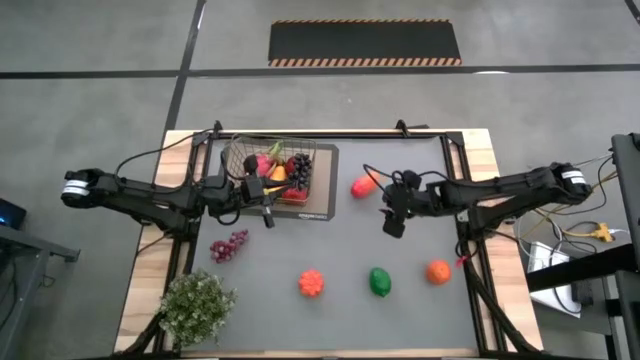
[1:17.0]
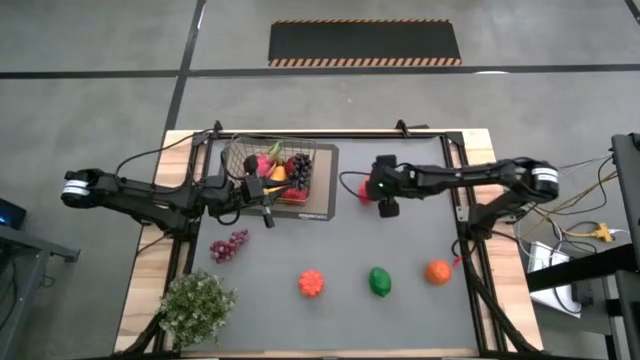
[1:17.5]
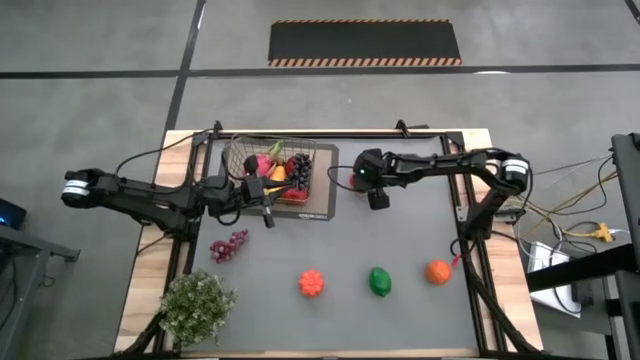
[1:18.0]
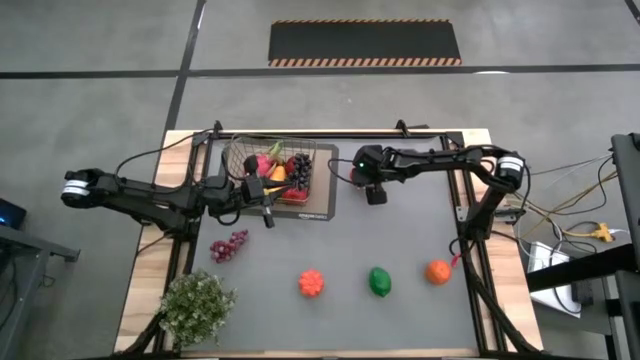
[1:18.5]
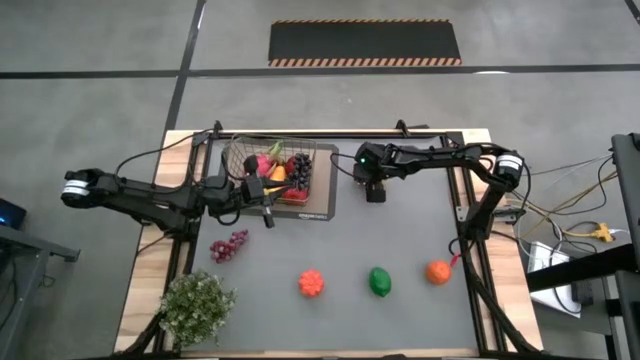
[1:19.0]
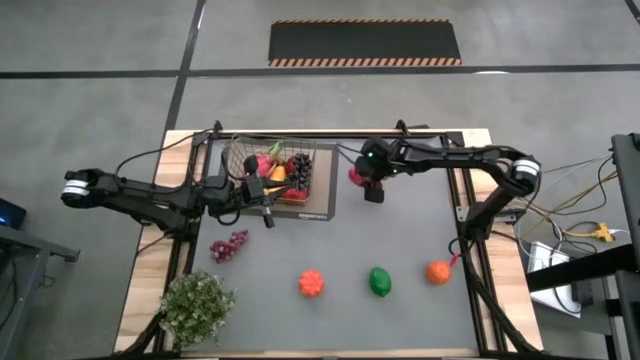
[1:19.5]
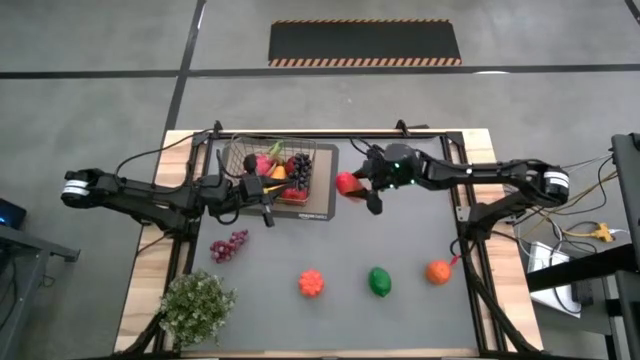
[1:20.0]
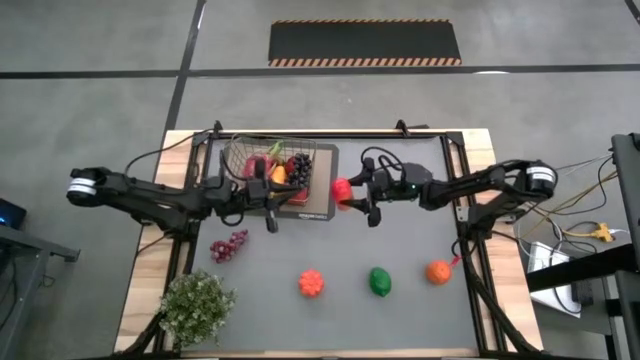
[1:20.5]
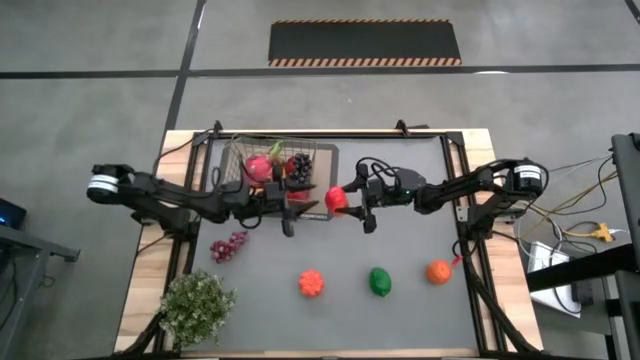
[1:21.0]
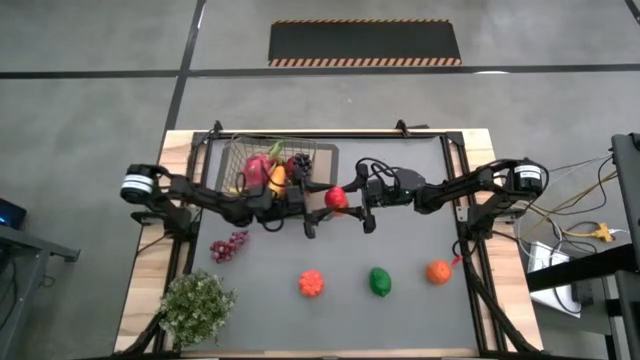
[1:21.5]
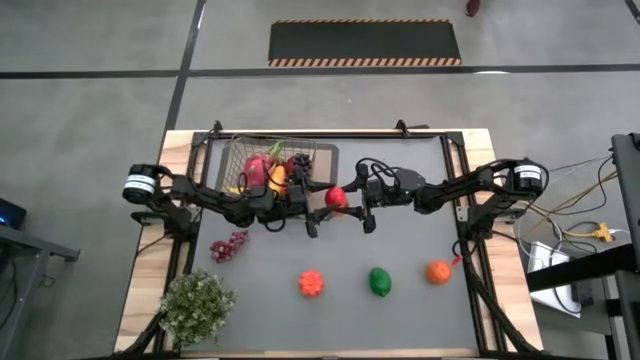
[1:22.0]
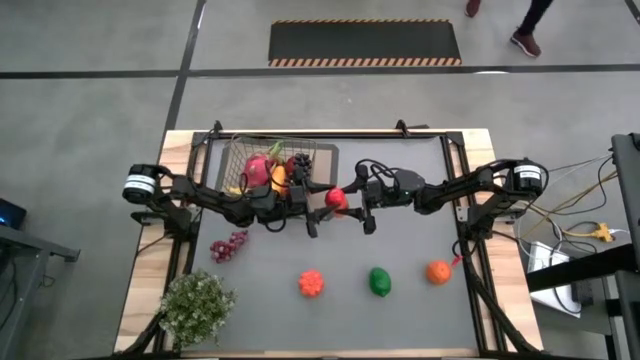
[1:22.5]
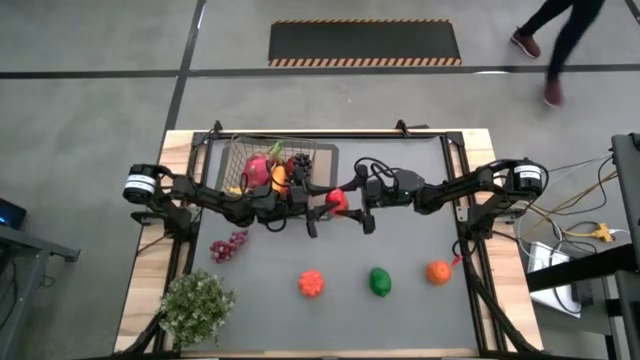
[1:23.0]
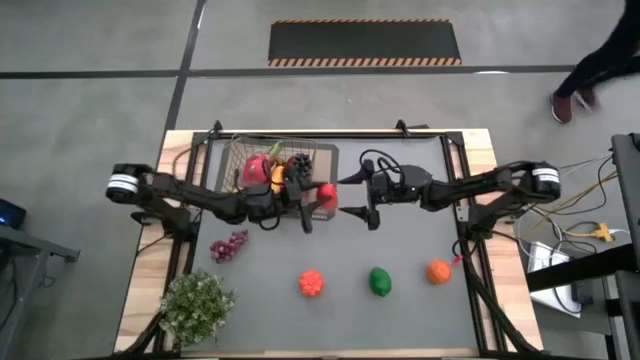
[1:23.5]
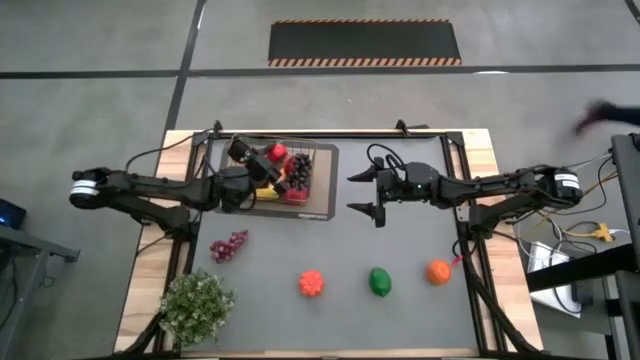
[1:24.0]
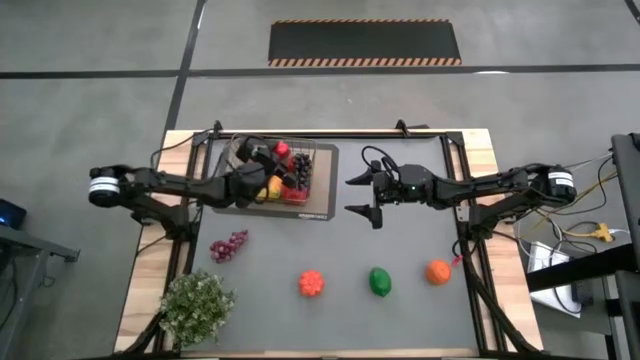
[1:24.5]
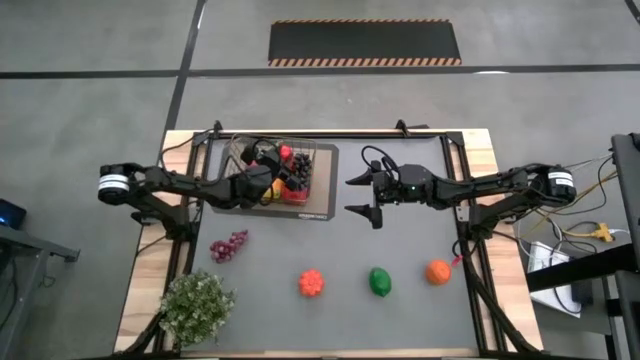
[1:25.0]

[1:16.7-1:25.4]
Task: Build produce basket
Put the orange mango into the wire basket

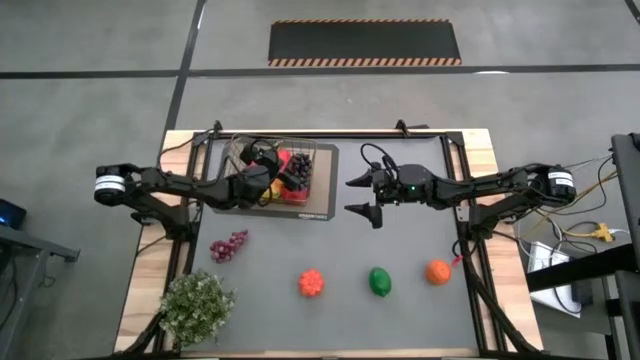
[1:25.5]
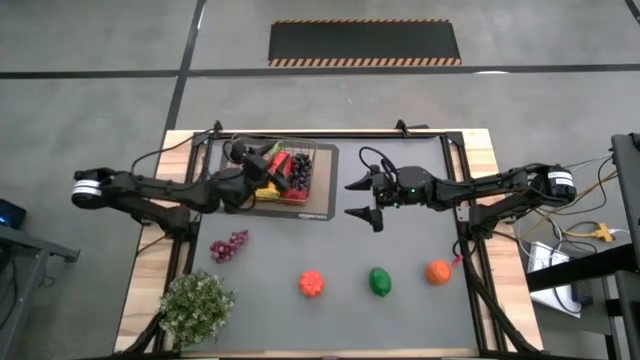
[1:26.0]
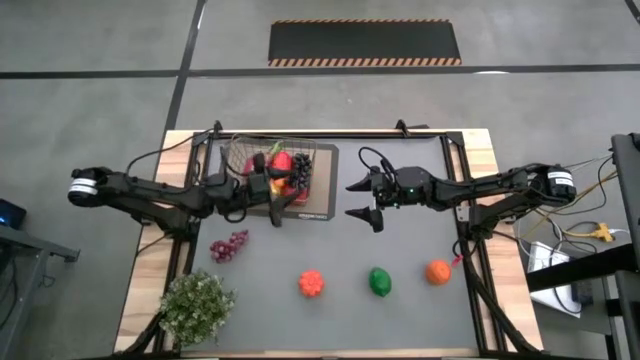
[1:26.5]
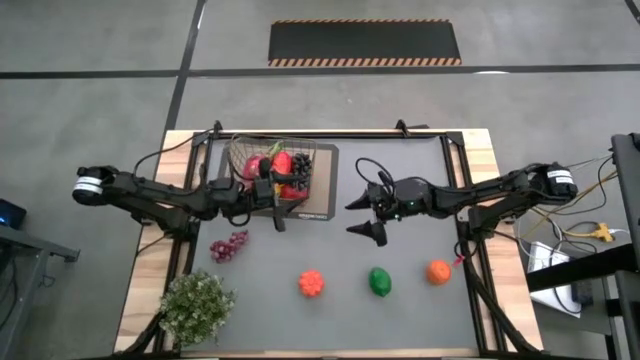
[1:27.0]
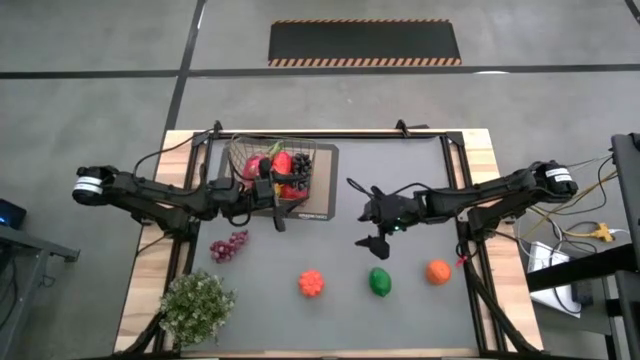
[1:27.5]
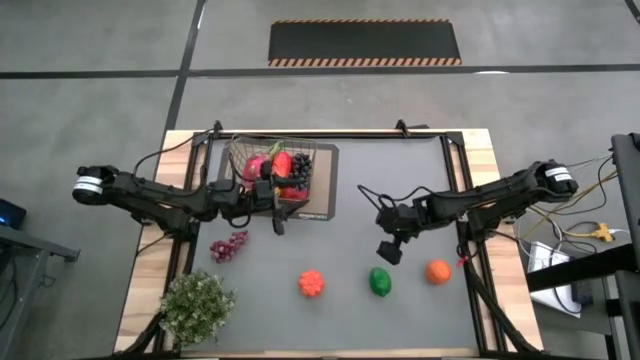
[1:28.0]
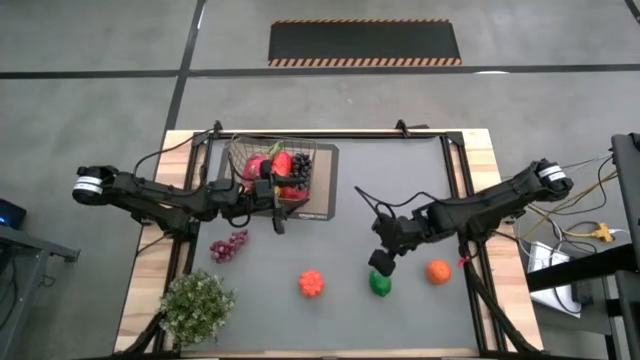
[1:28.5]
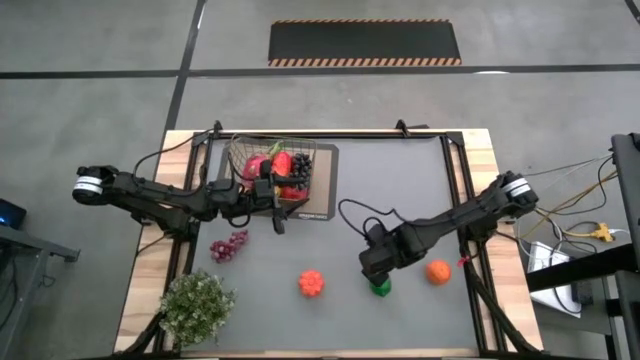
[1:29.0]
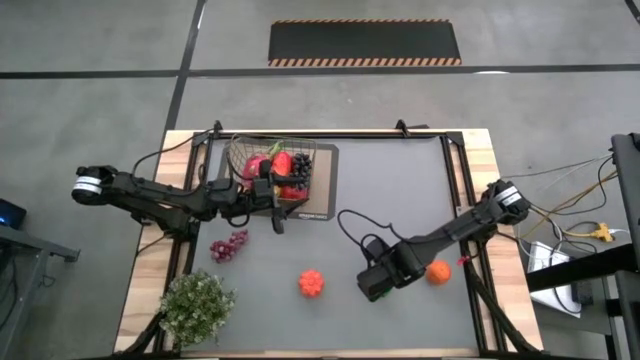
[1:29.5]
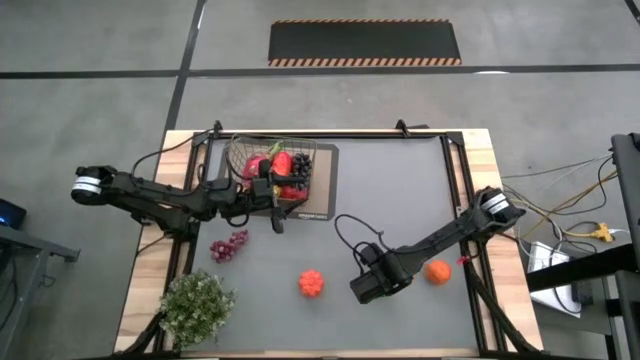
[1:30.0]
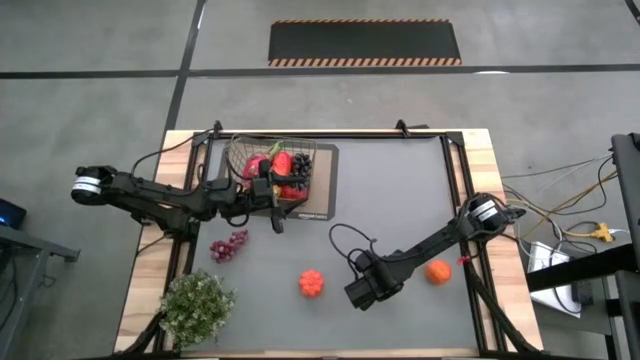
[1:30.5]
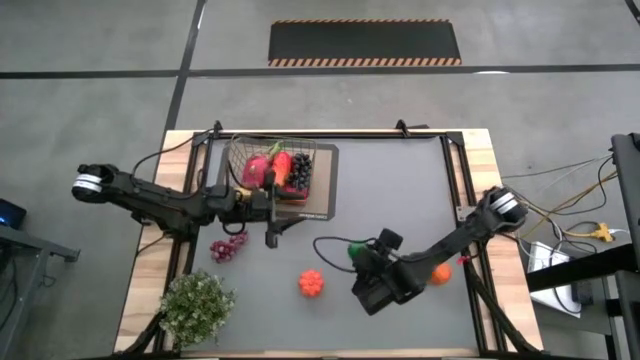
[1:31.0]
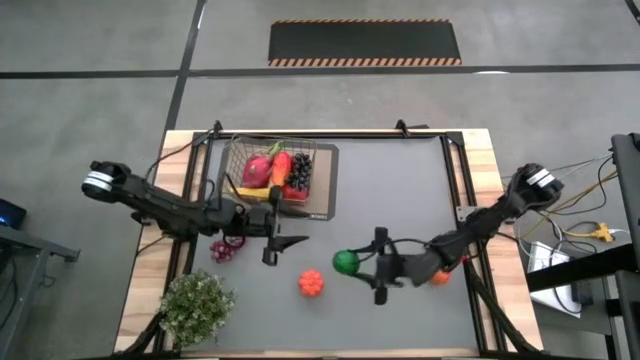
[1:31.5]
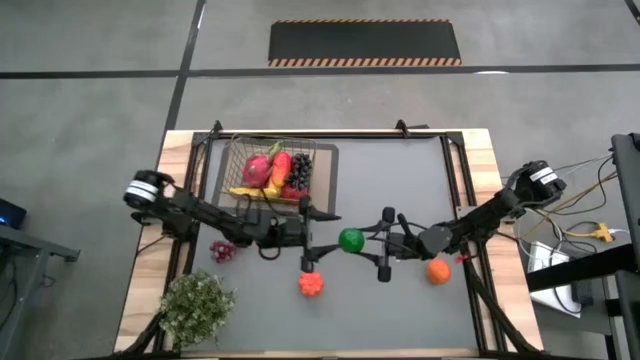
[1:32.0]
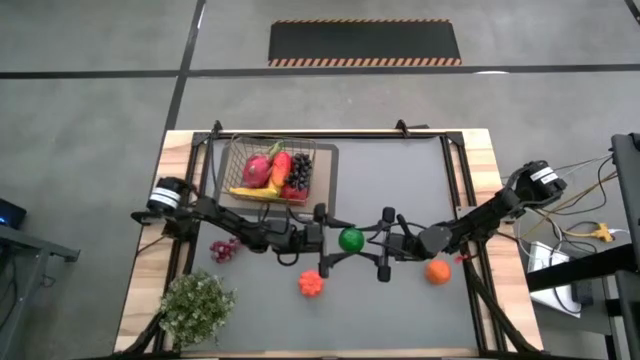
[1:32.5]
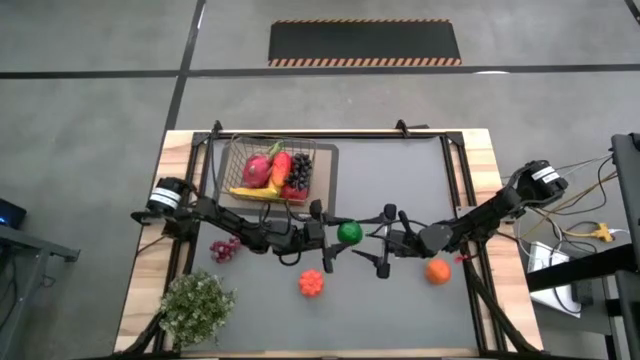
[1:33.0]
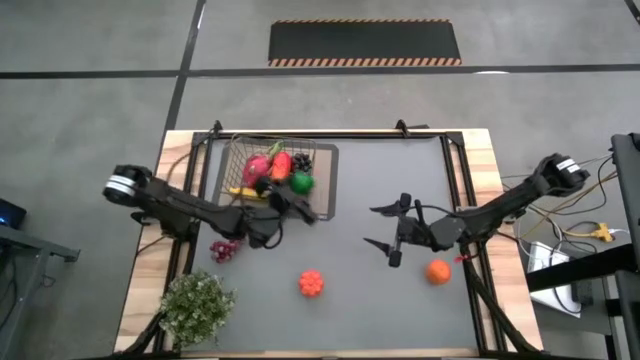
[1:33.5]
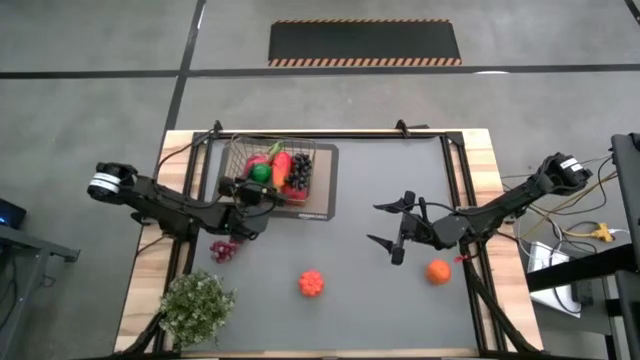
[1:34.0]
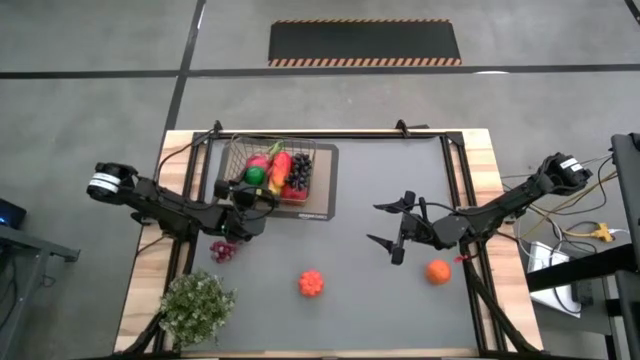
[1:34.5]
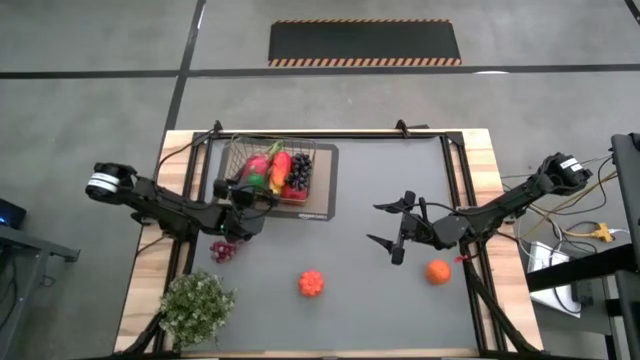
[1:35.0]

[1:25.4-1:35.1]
Put the green lime into the wire basket

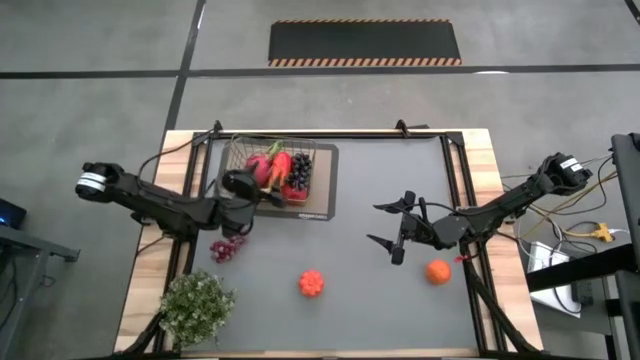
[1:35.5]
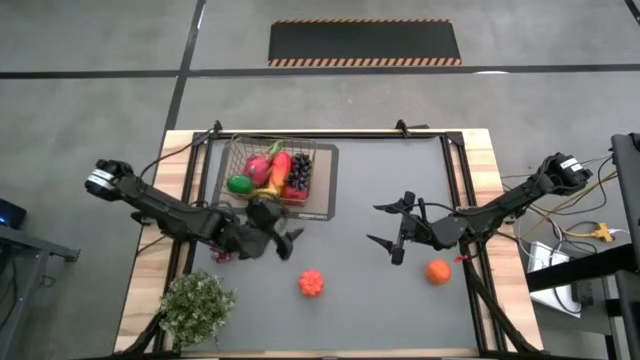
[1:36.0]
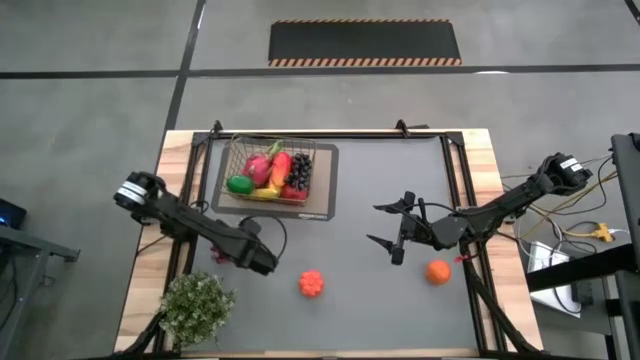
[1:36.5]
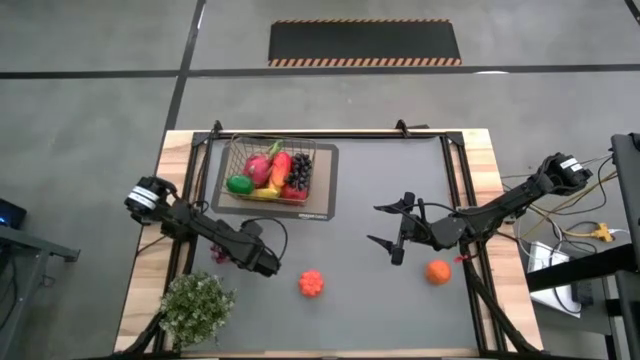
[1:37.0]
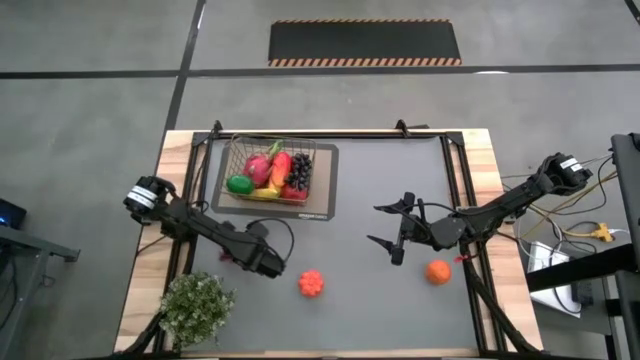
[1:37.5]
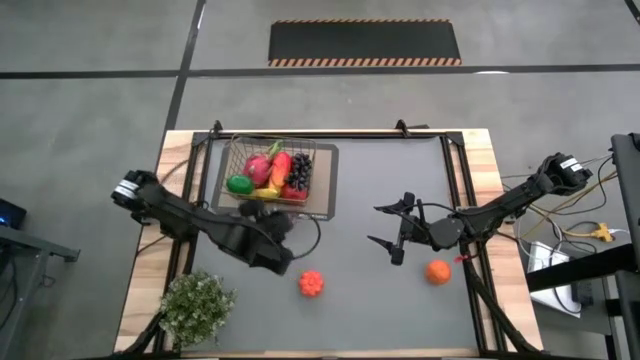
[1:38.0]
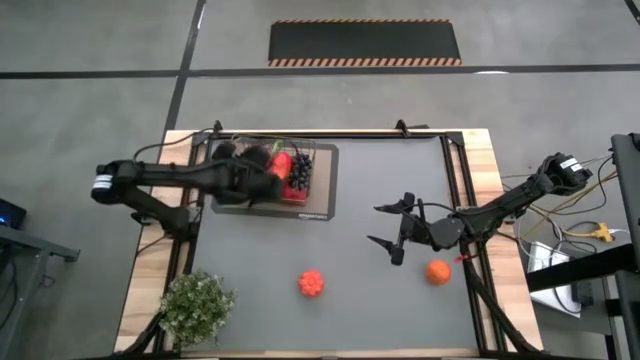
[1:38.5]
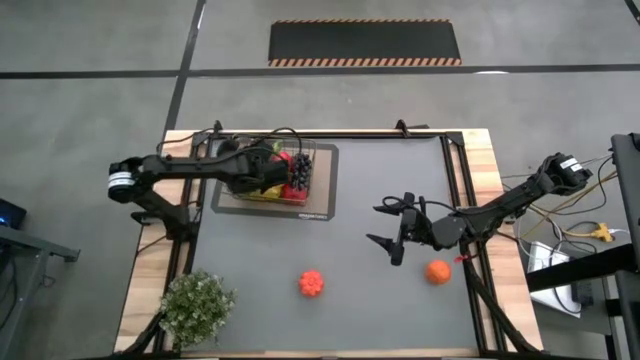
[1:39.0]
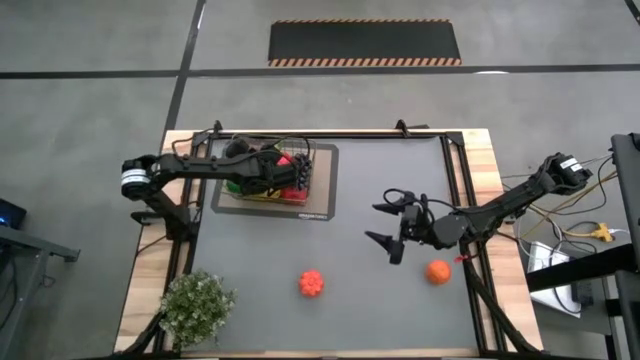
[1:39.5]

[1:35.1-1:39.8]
Put the red grapes into the wire basket
